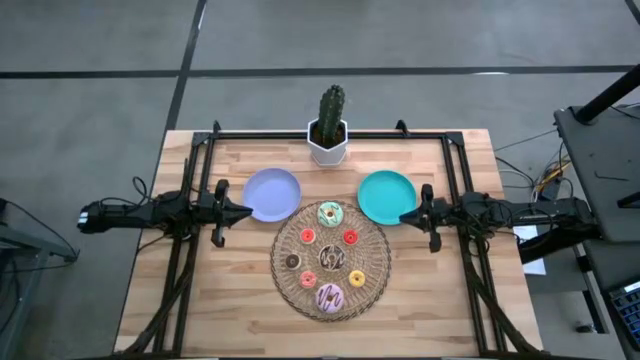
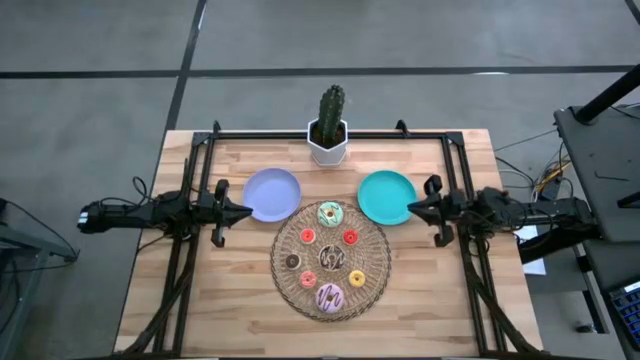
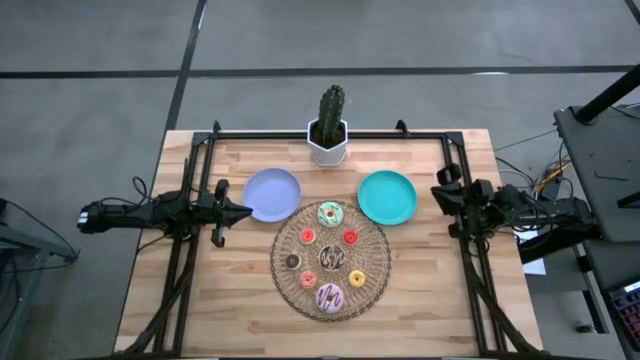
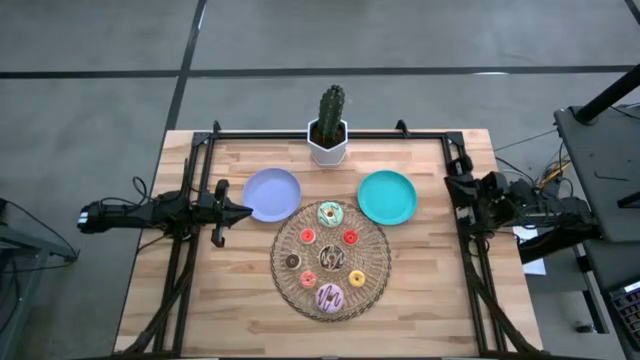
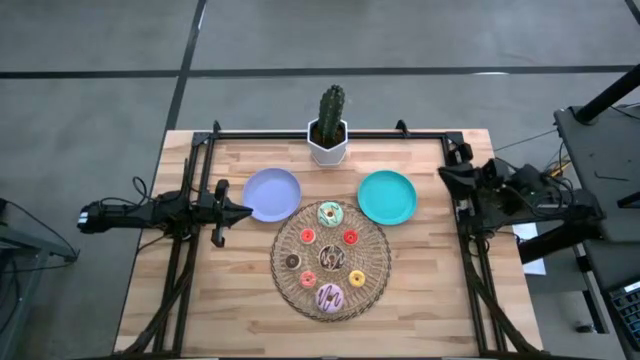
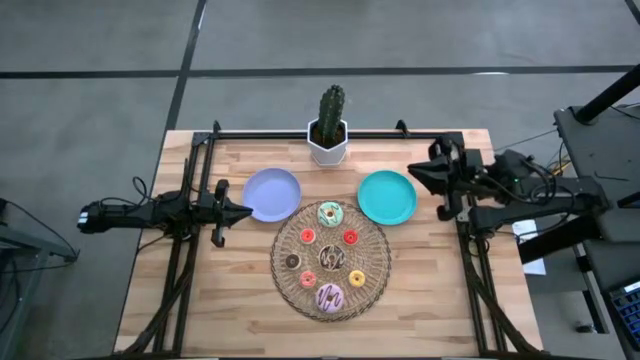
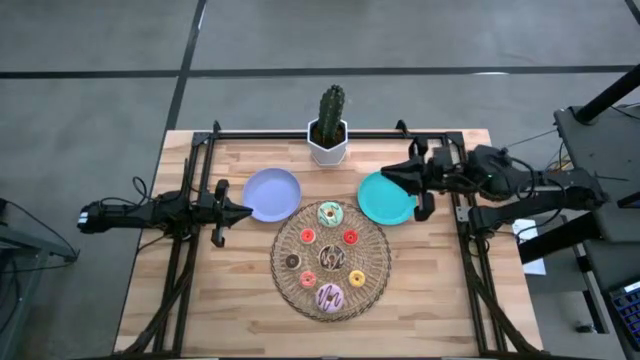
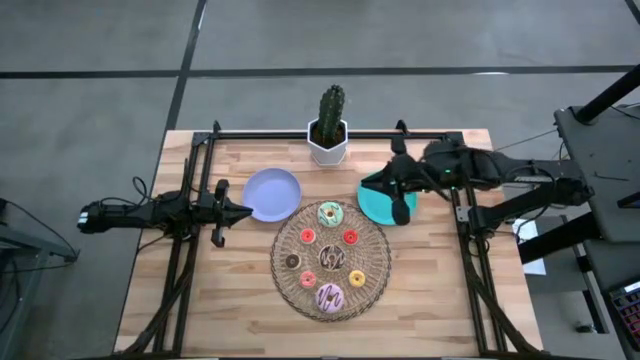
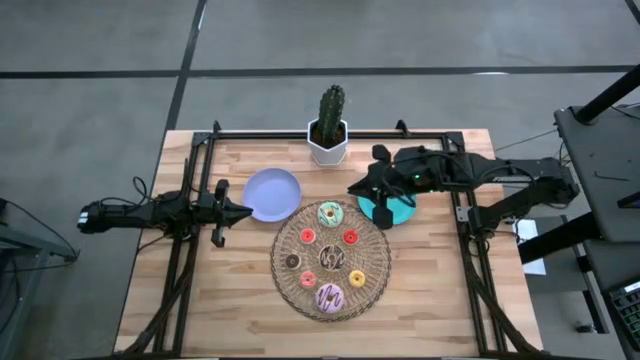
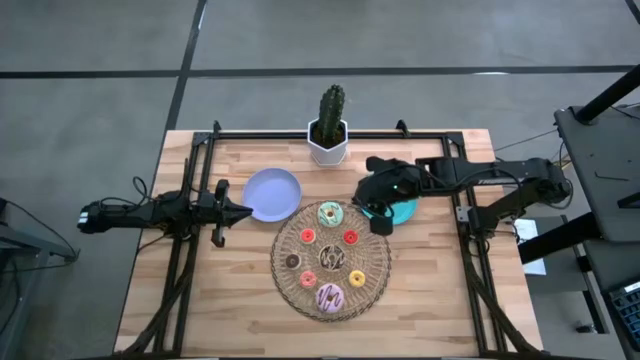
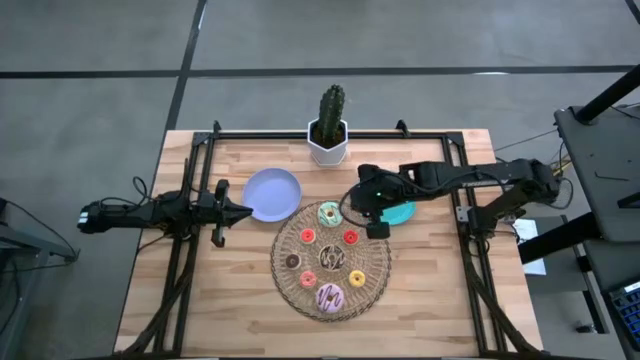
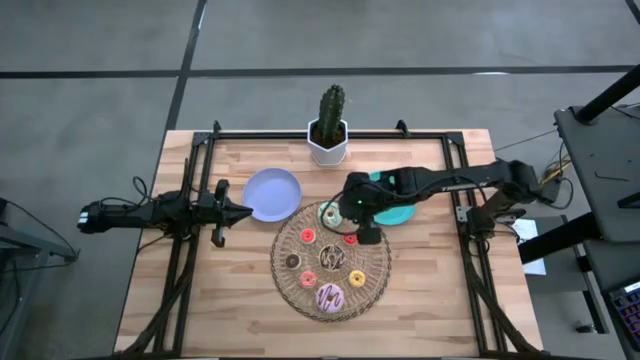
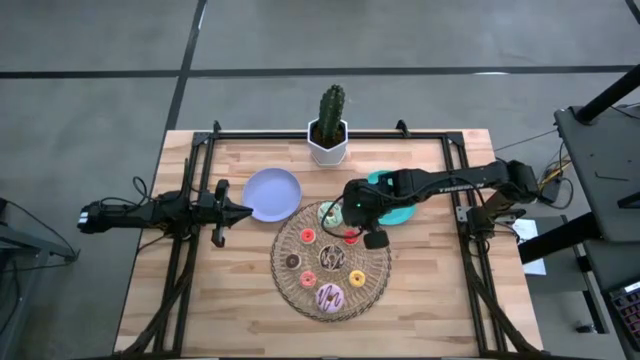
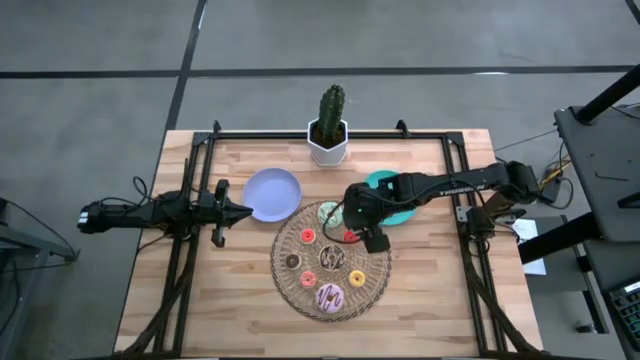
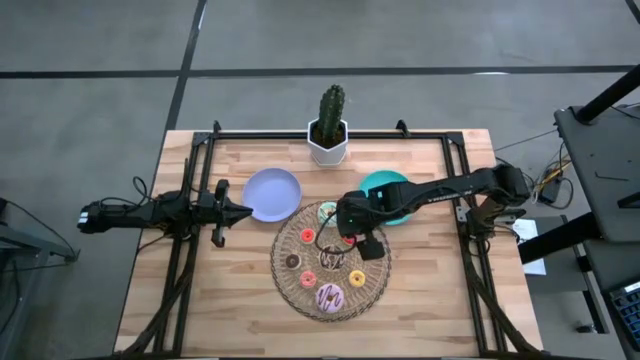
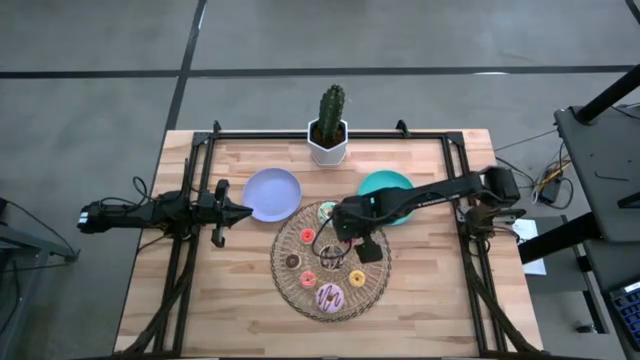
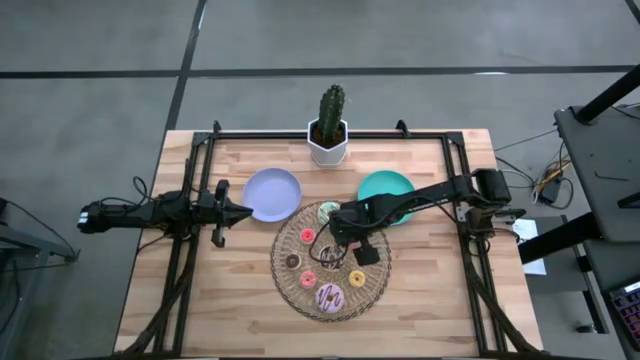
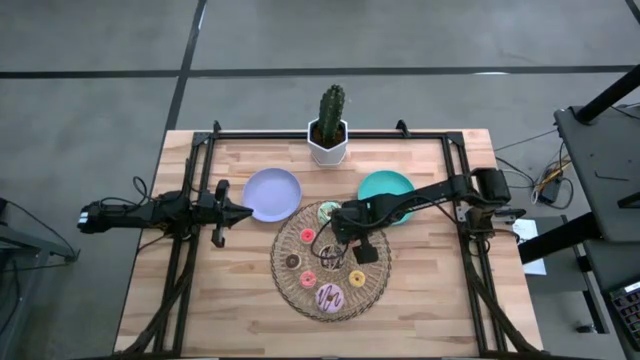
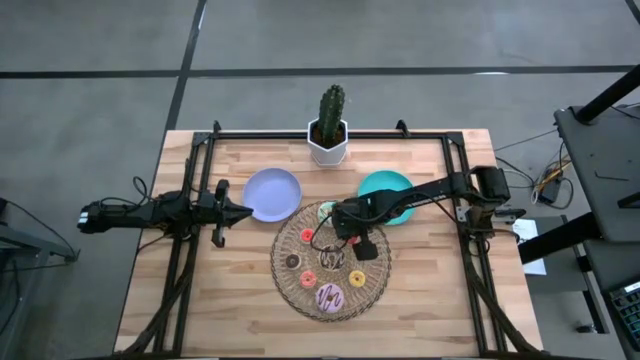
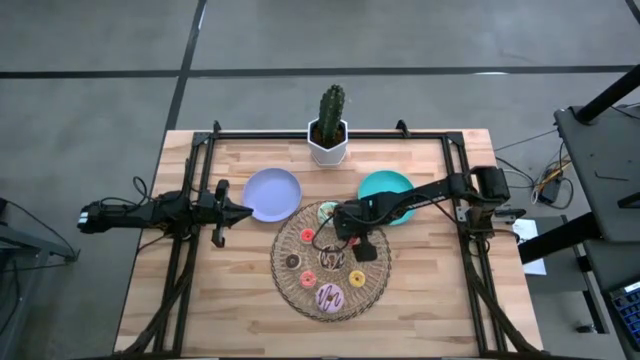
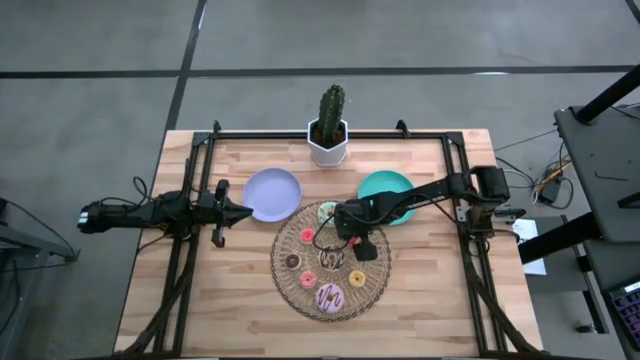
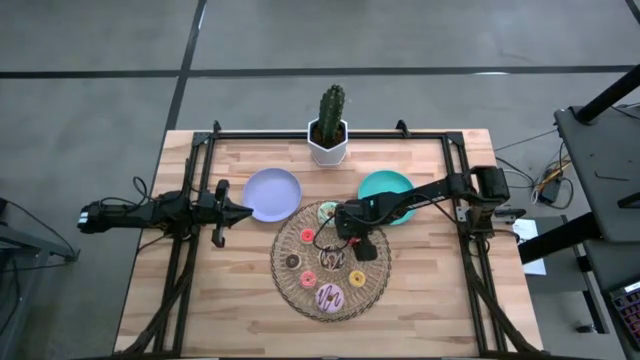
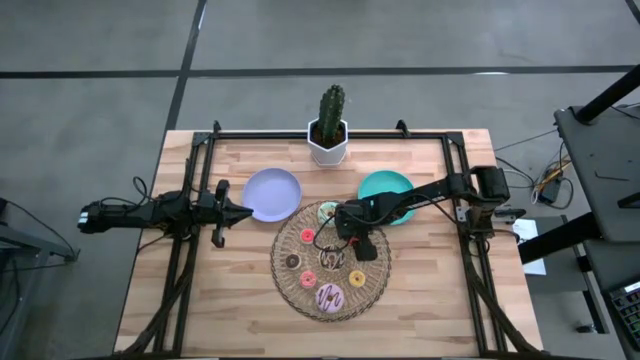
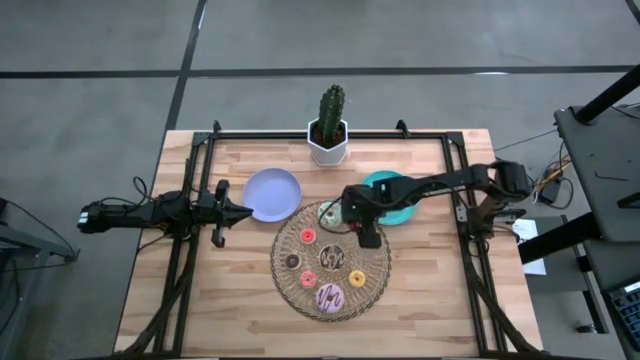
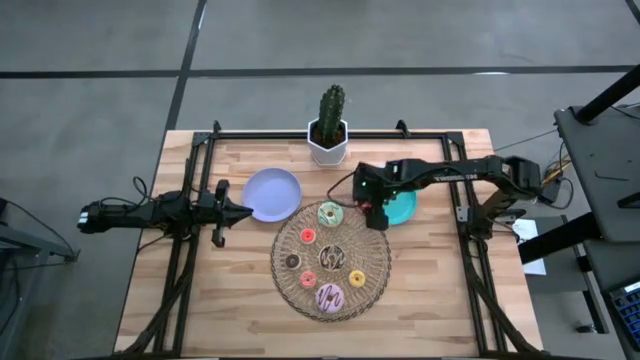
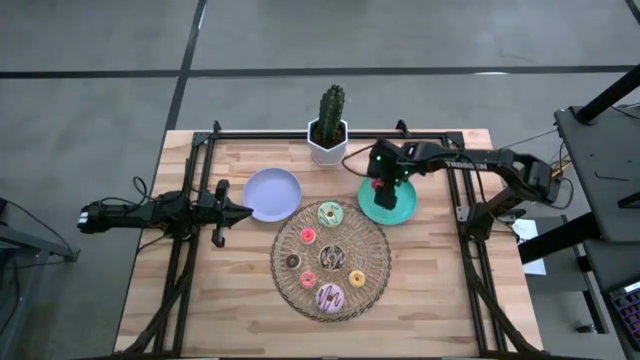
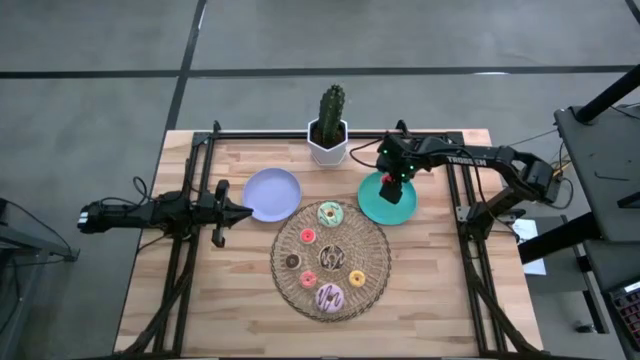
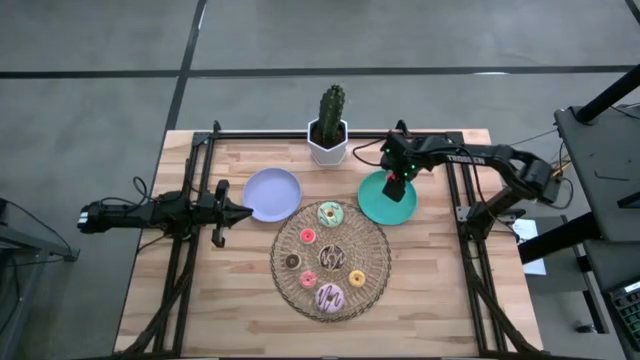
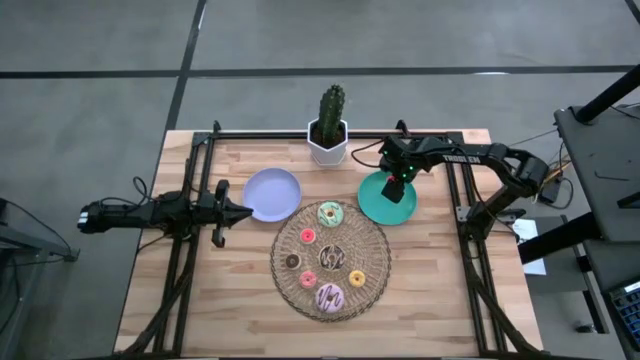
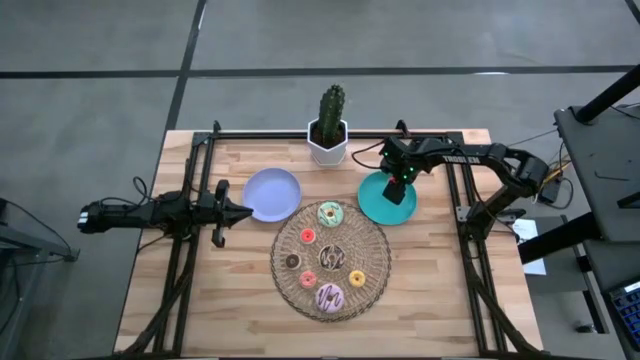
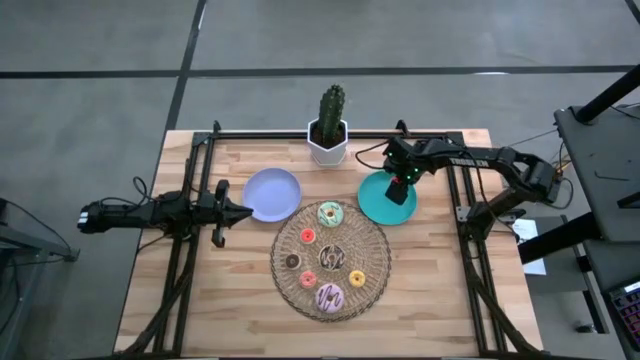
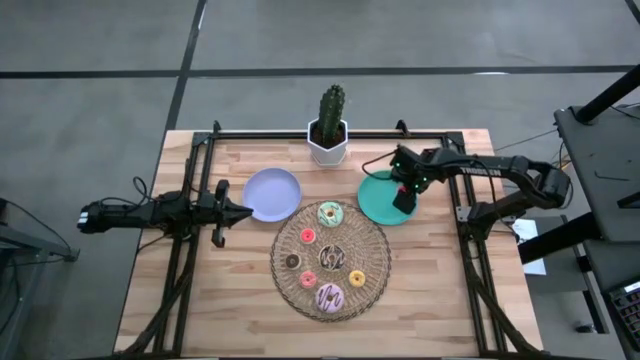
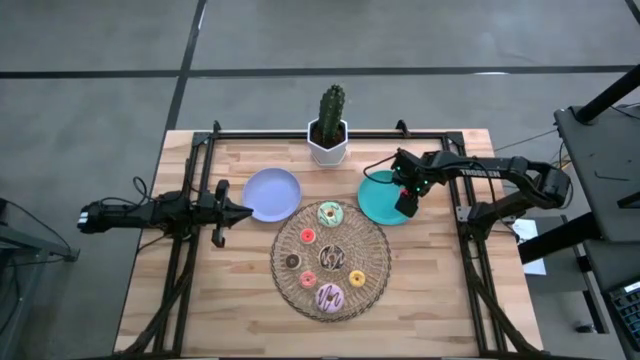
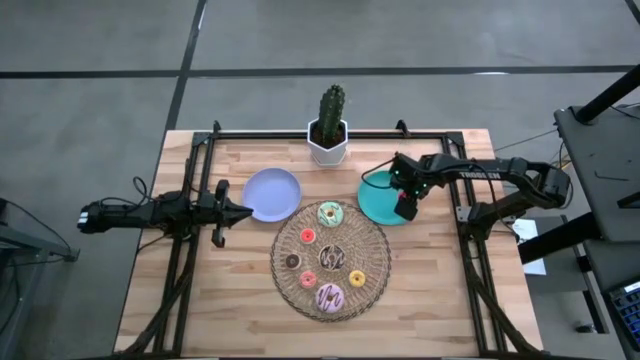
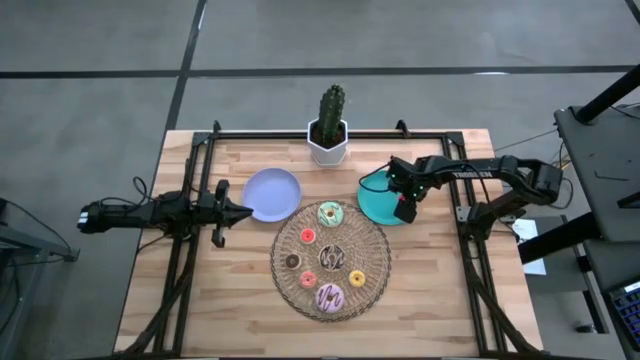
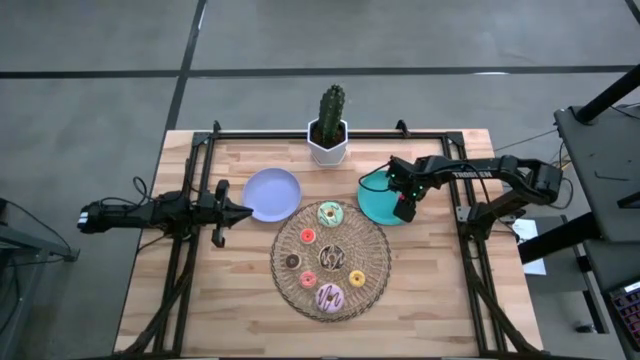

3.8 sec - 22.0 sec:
Task: Pick & Place donuts
Put the small red donut on the blue plate
